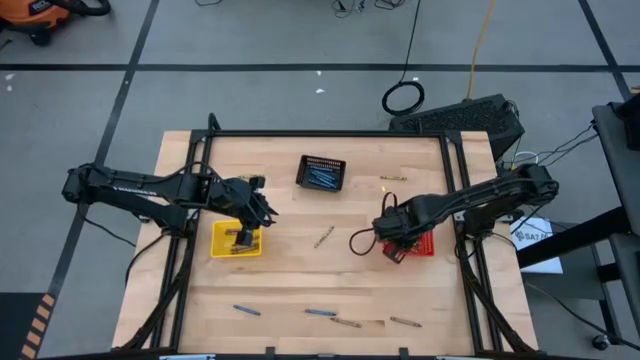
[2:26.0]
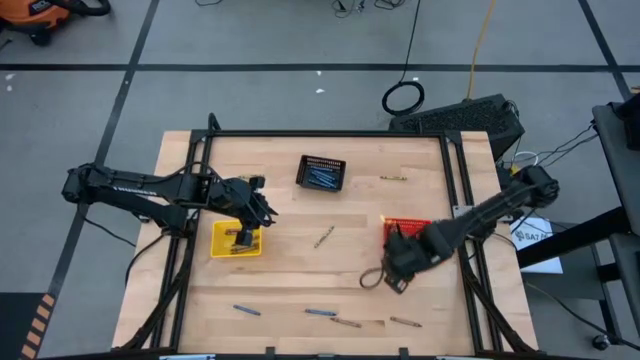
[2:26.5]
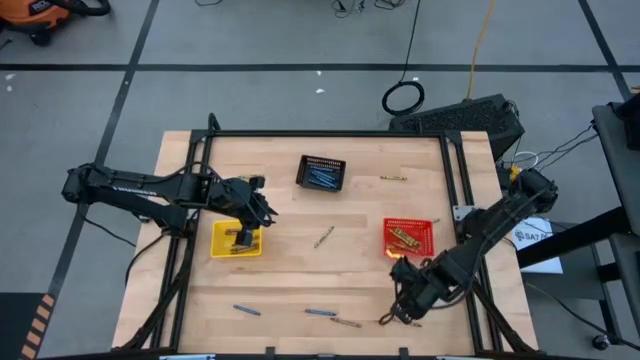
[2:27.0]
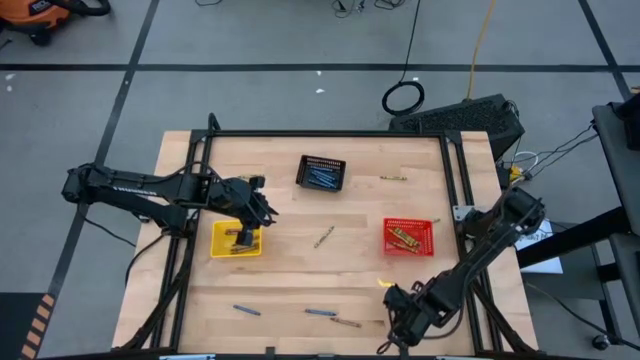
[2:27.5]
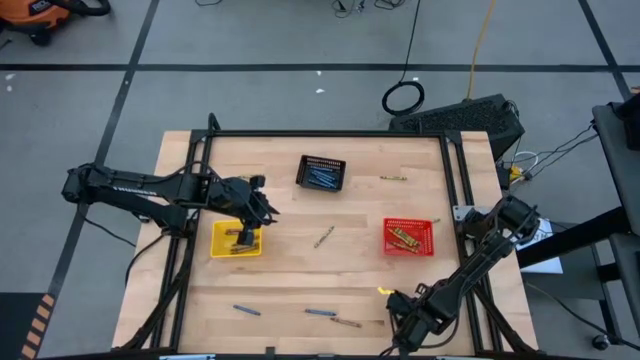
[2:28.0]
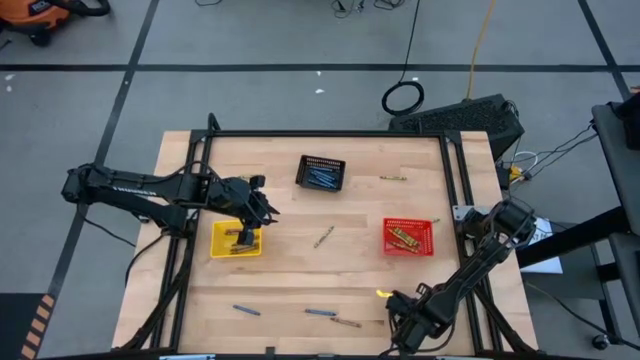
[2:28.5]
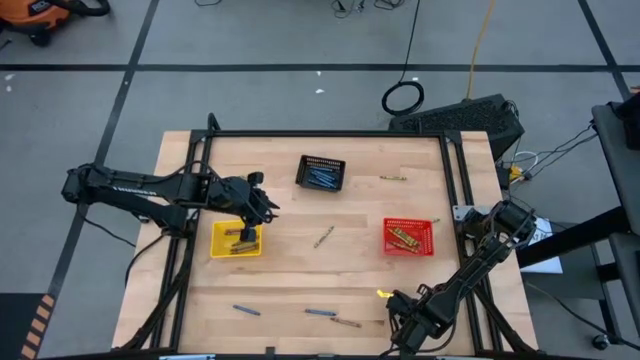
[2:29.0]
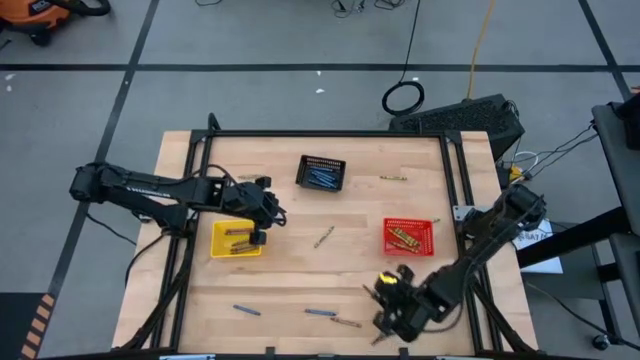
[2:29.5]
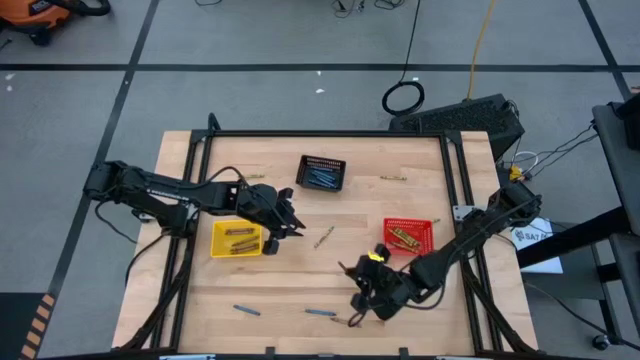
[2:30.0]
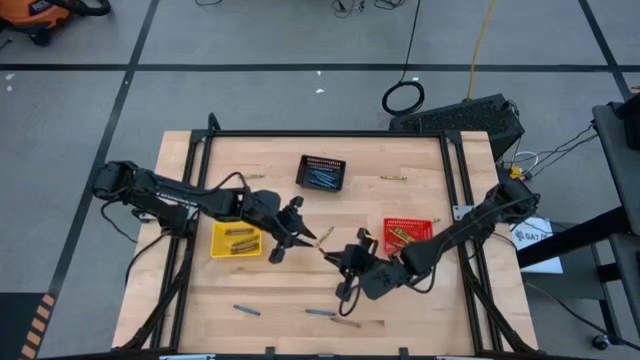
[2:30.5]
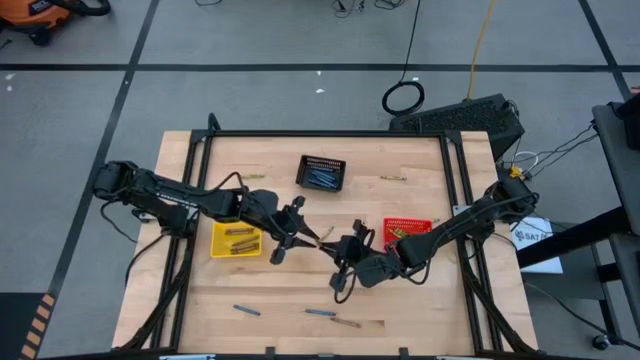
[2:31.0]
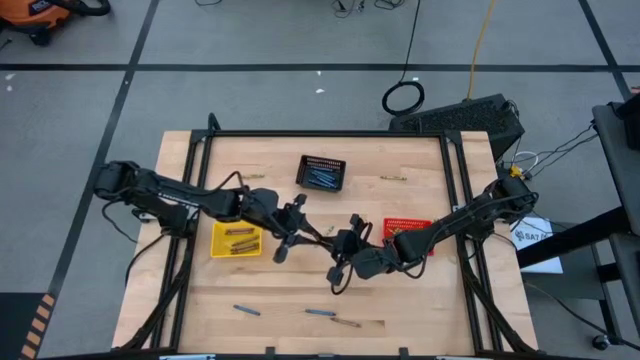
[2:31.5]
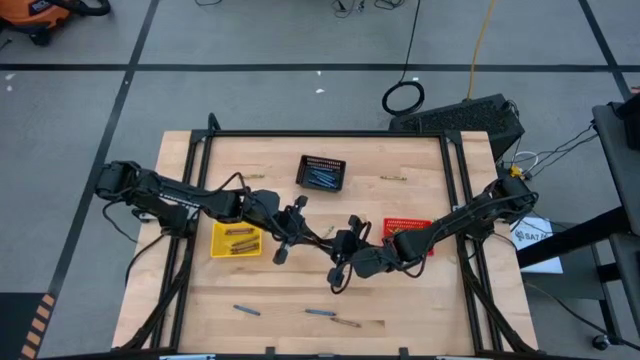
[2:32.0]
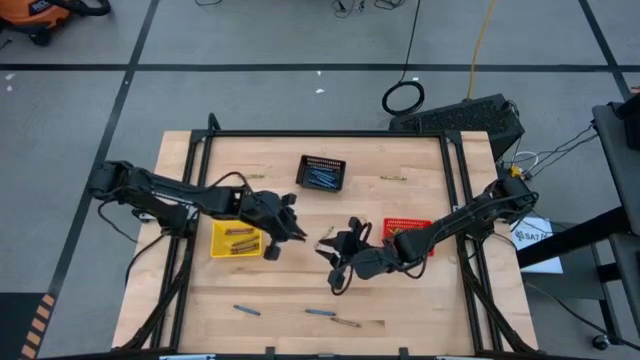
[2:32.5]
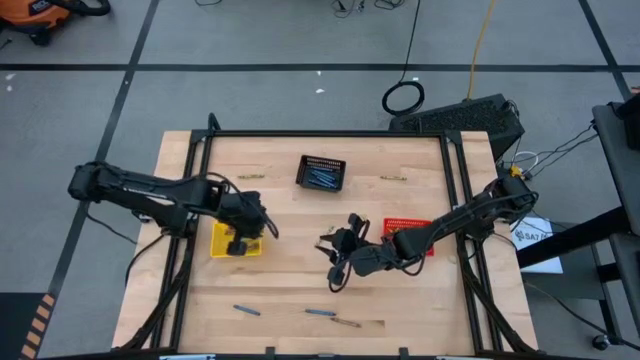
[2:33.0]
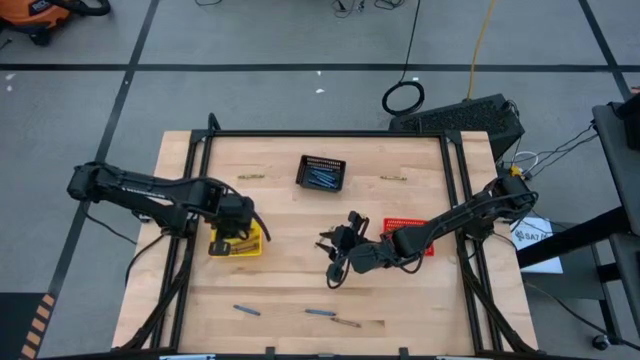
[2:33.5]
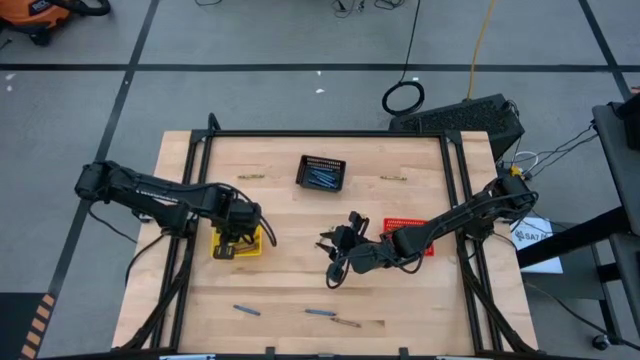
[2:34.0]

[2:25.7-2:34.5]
Task: Sort crayons
Put the brown crayon into the yellow bin

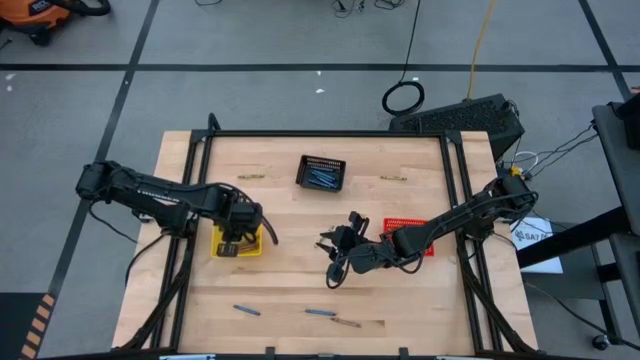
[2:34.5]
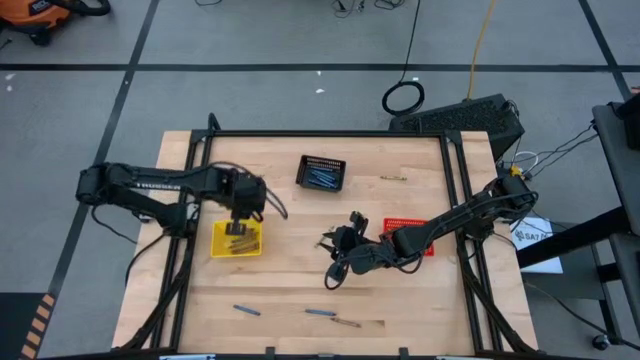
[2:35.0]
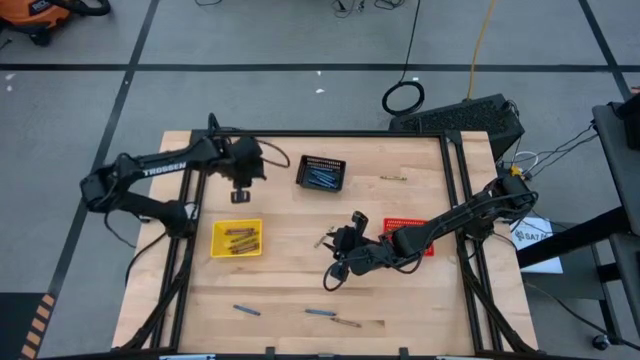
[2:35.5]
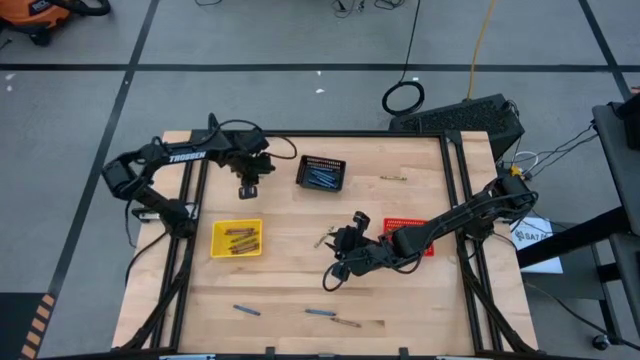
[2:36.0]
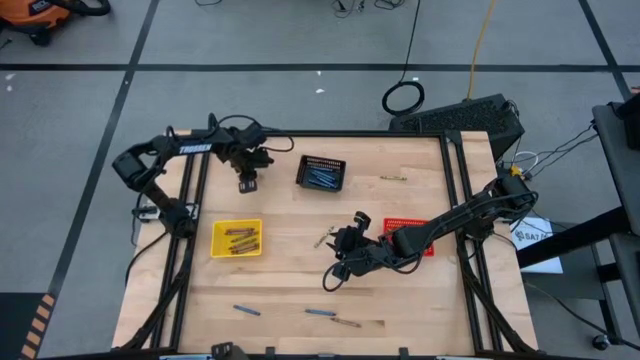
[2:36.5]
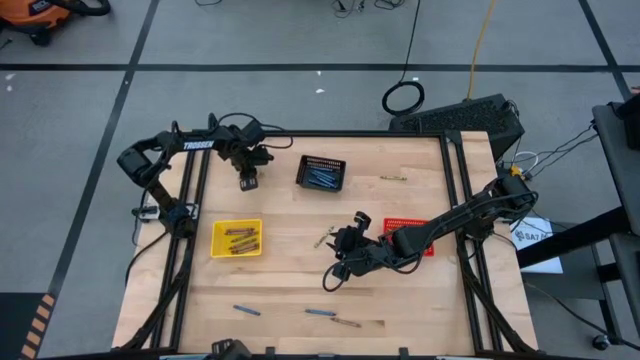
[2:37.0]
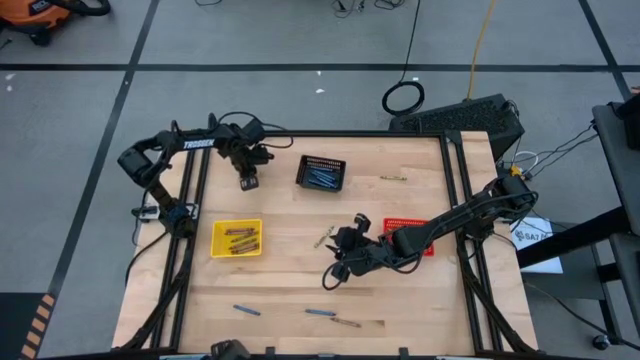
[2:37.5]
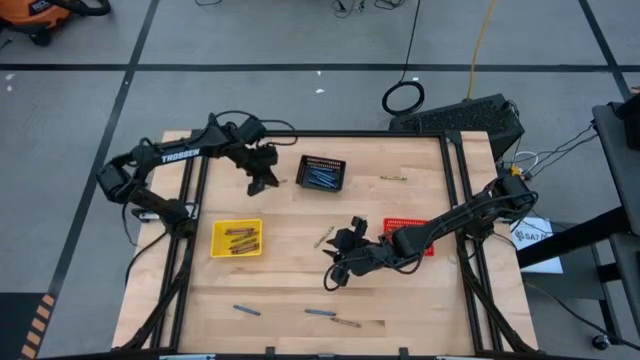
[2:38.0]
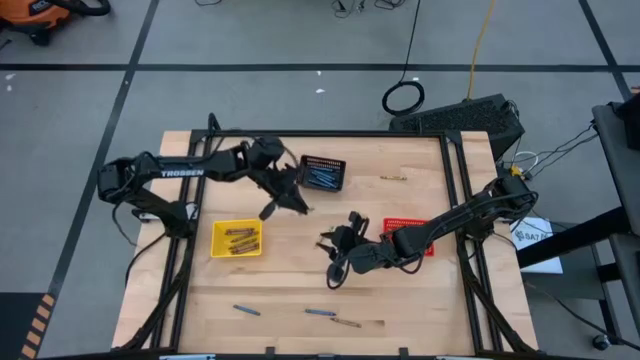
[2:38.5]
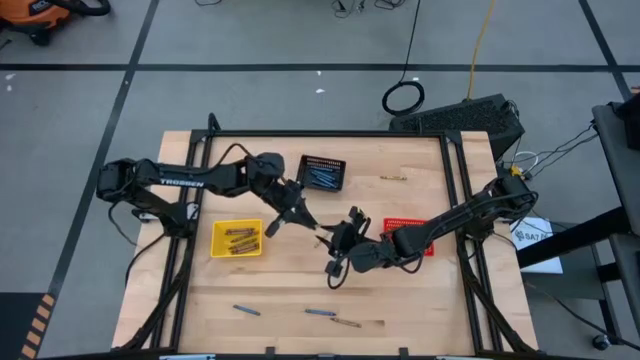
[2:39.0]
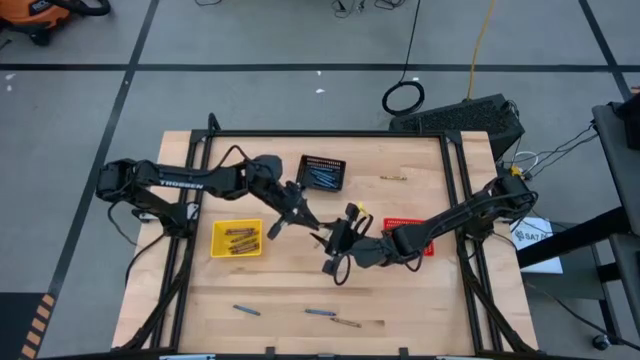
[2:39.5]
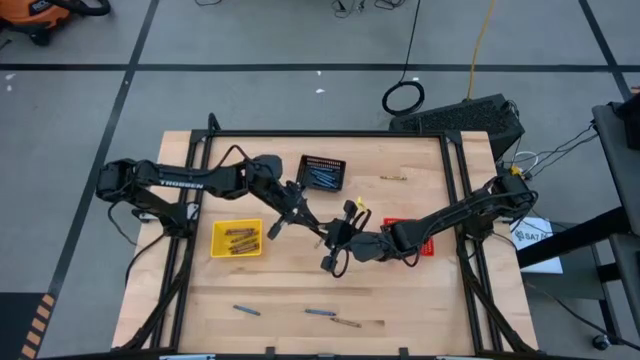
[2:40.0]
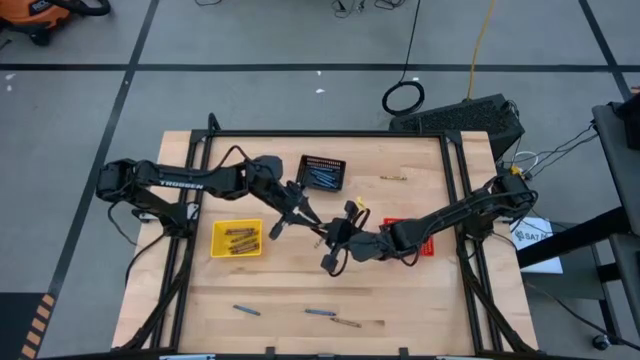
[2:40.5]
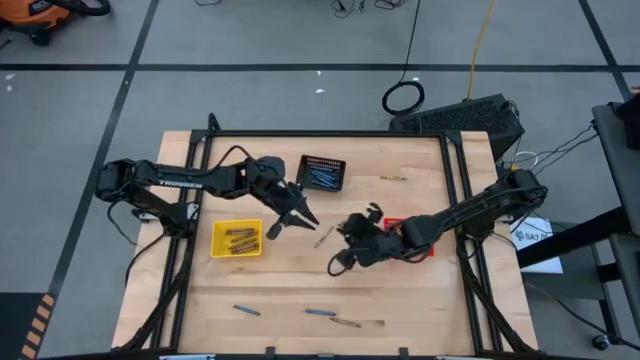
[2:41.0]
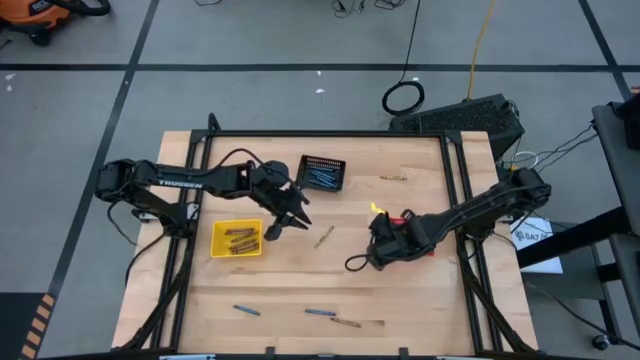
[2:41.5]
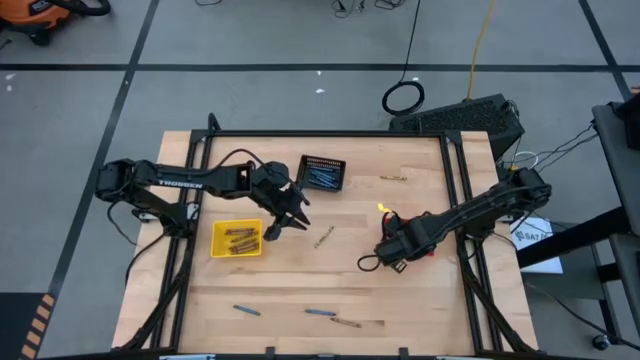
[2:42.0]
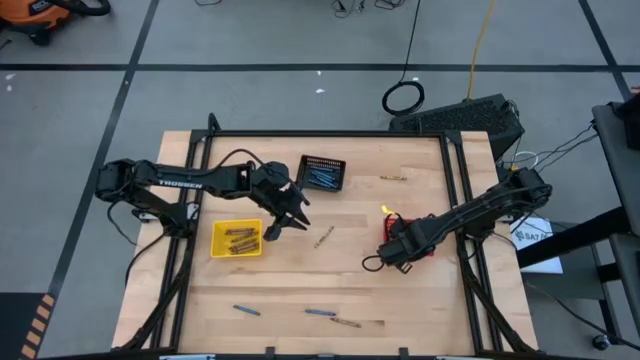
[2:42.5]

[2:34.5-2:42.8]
Put the green crayon into the red bin

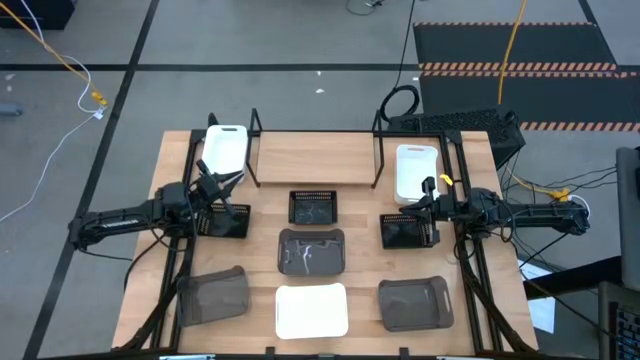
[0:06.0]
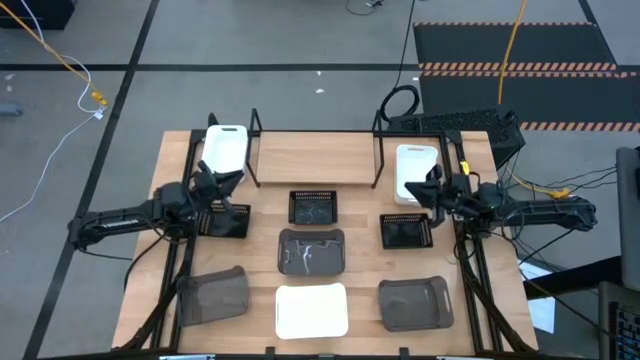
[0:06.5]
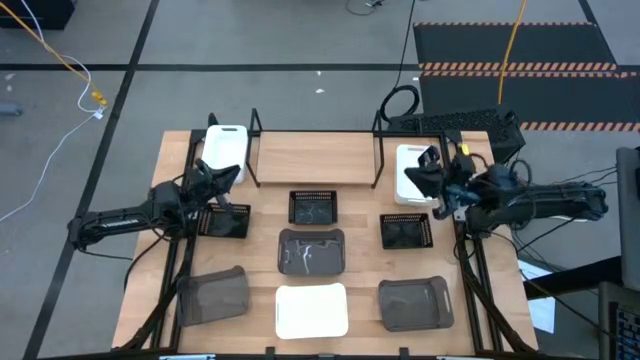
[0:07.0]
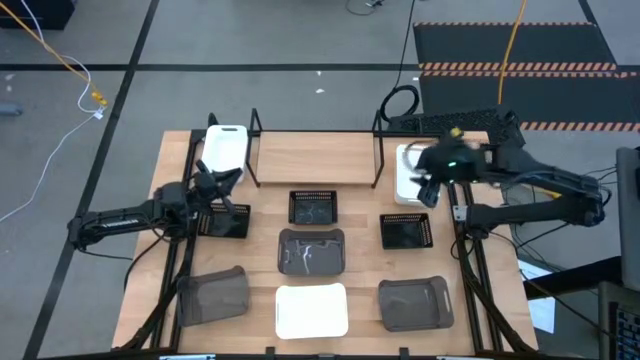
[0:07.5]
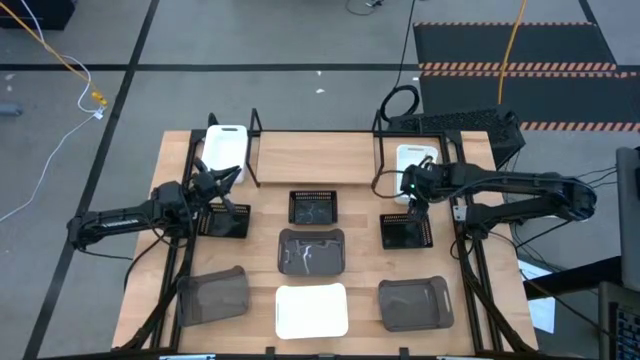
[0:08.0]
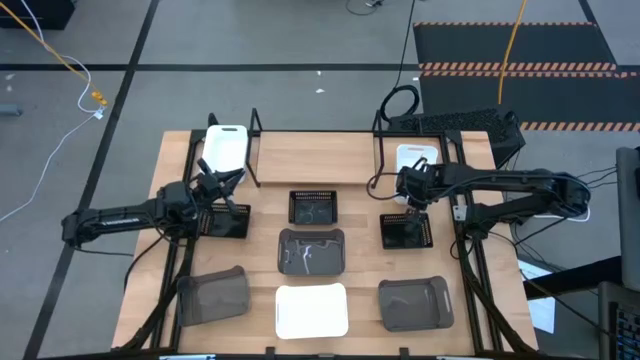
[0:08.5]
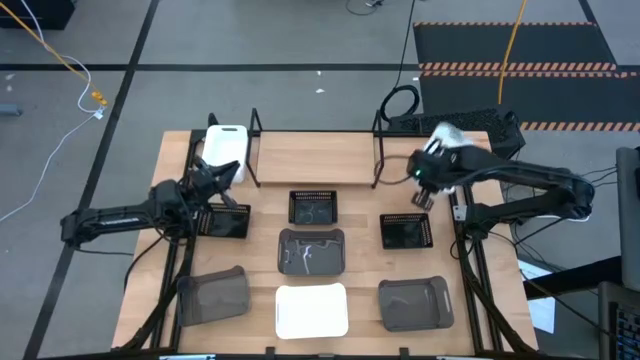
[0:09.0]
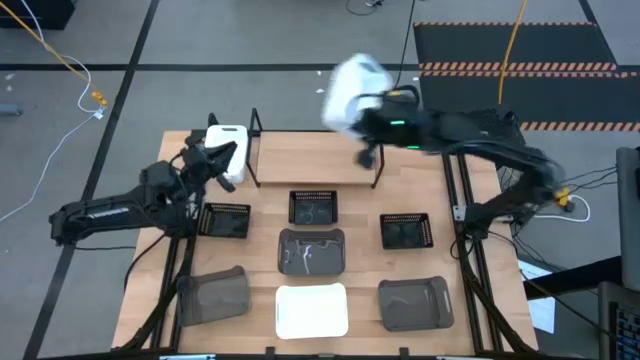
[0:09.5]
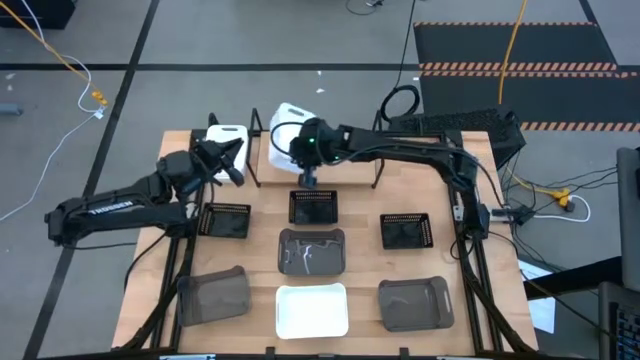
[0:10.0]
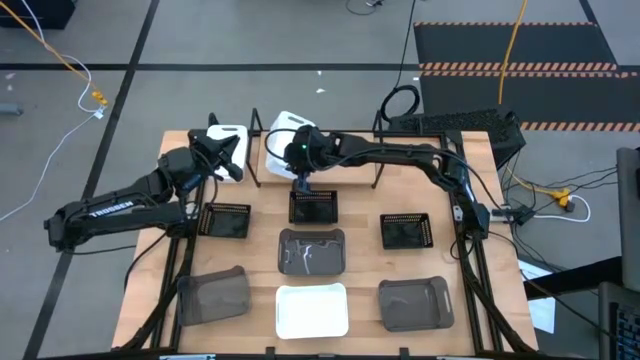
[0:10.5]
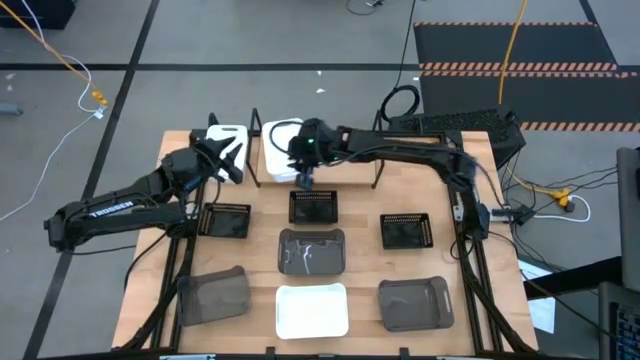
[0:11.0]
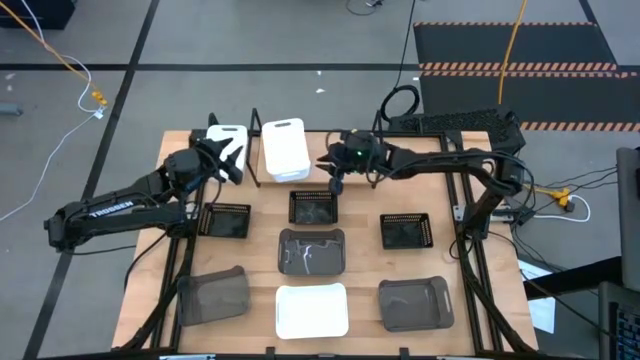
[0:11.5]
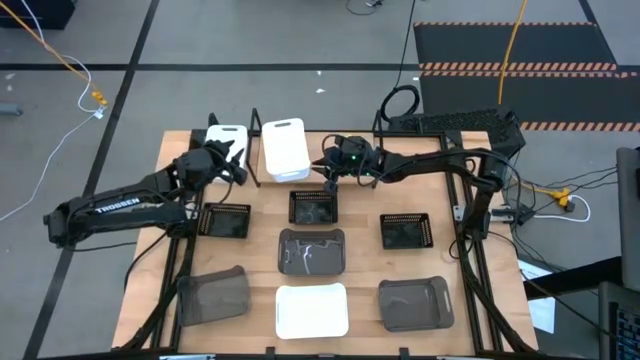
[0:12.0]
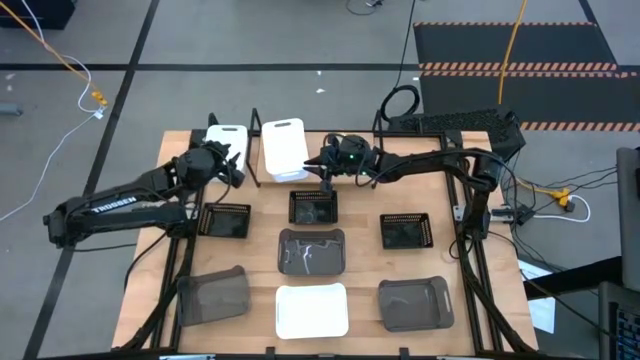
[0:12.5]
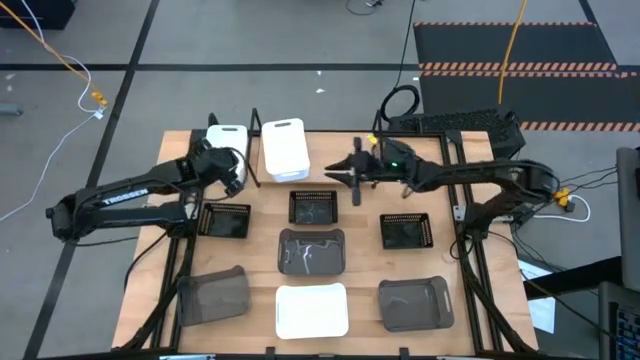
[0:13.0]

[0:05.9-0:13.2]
Task: Stack baskets on shelf by color
Put the top right white bin on the shelf
